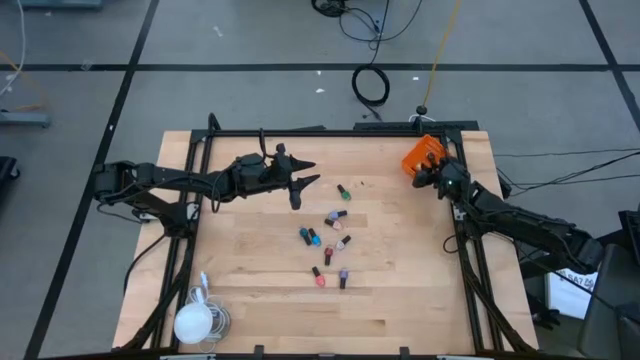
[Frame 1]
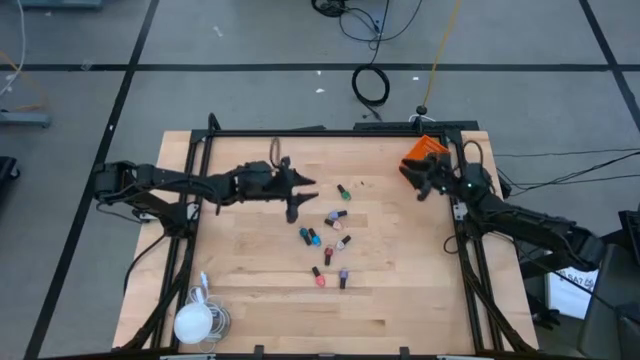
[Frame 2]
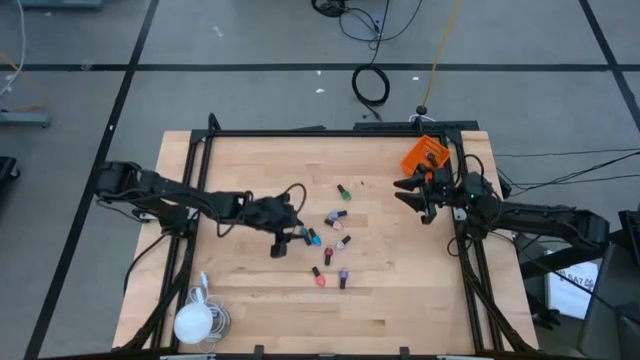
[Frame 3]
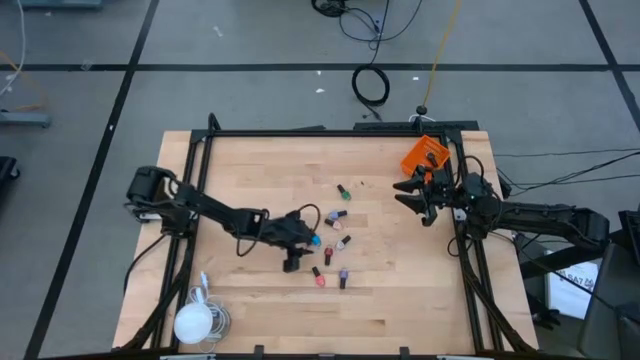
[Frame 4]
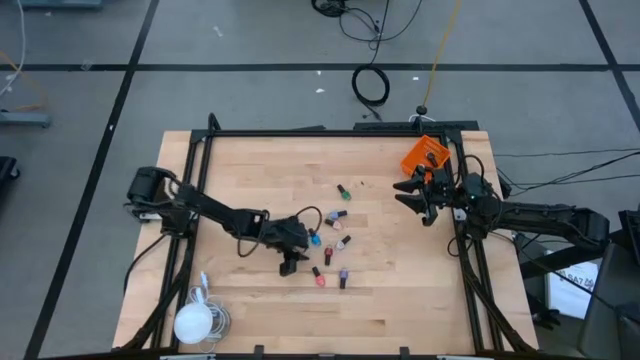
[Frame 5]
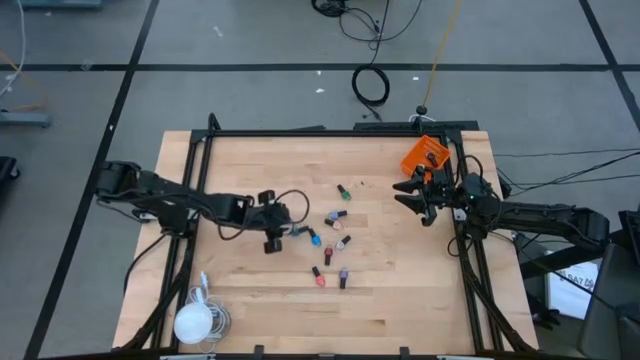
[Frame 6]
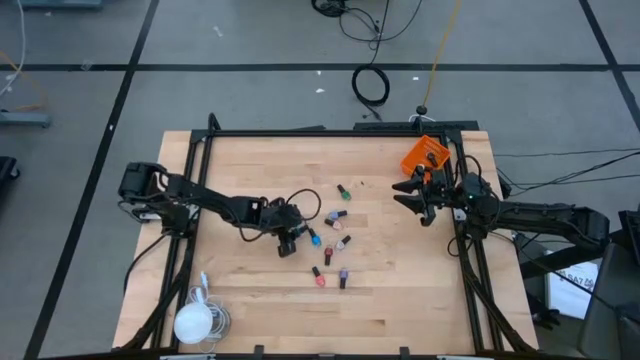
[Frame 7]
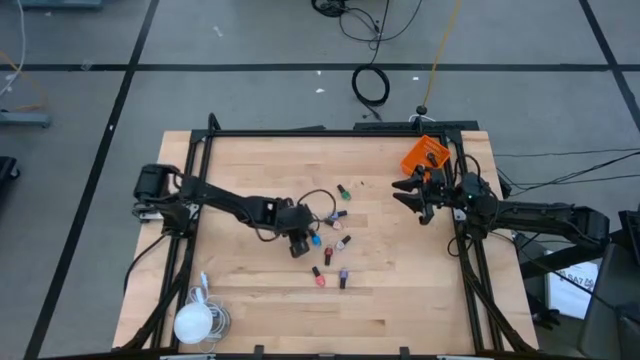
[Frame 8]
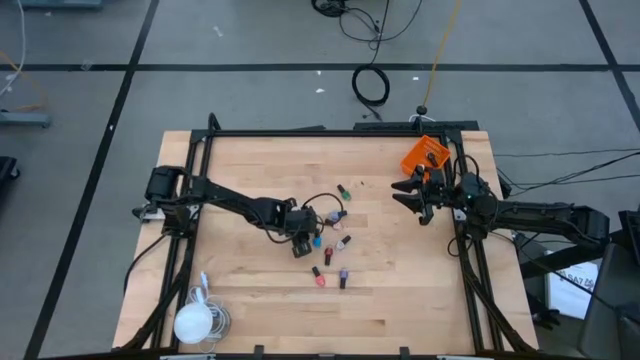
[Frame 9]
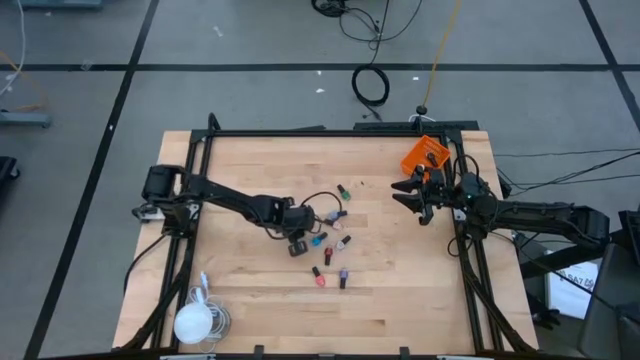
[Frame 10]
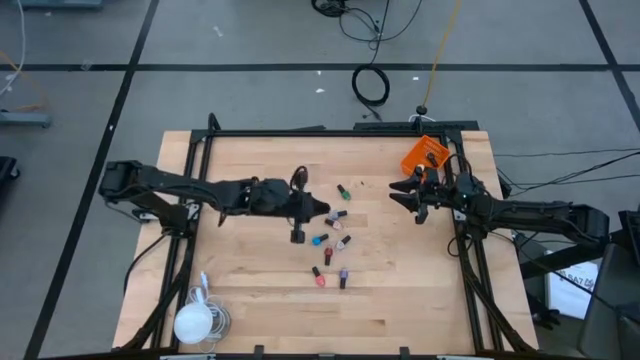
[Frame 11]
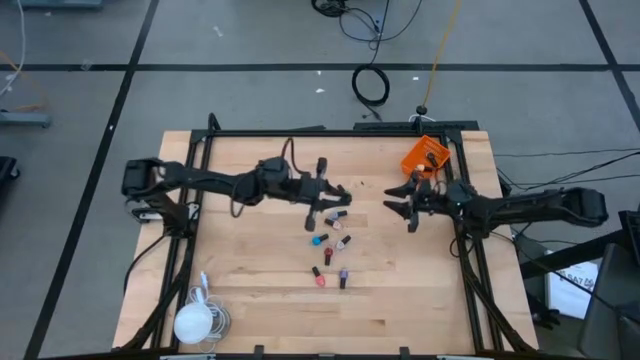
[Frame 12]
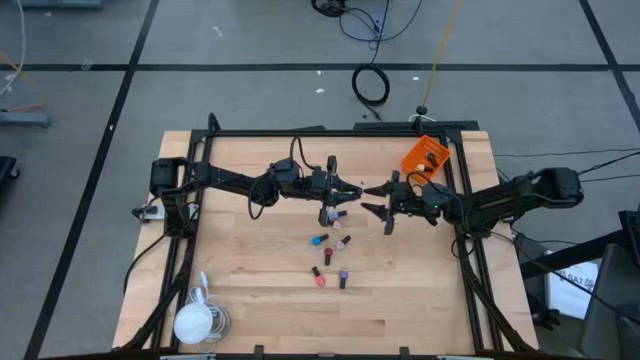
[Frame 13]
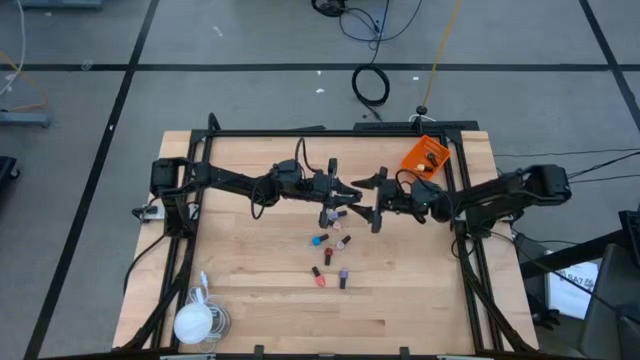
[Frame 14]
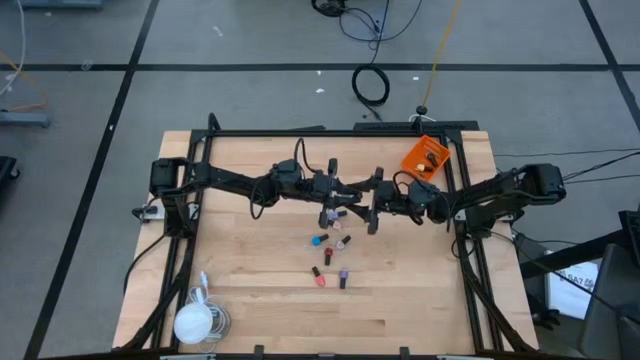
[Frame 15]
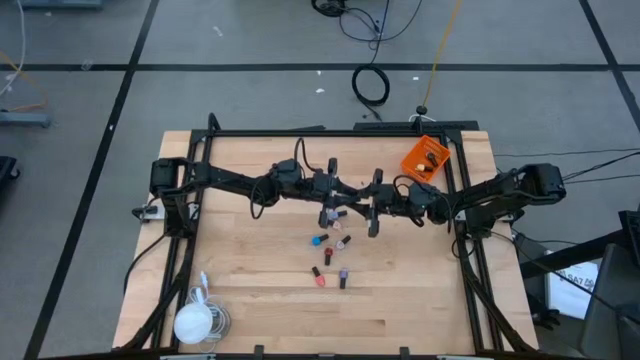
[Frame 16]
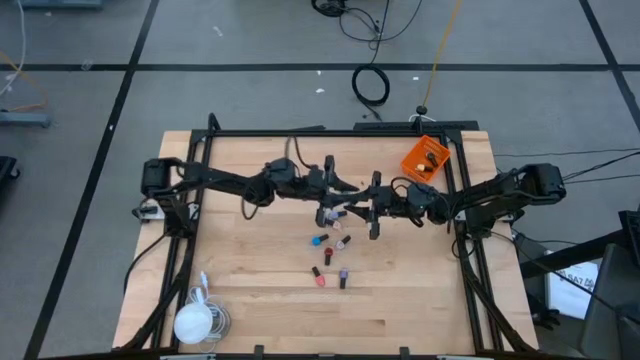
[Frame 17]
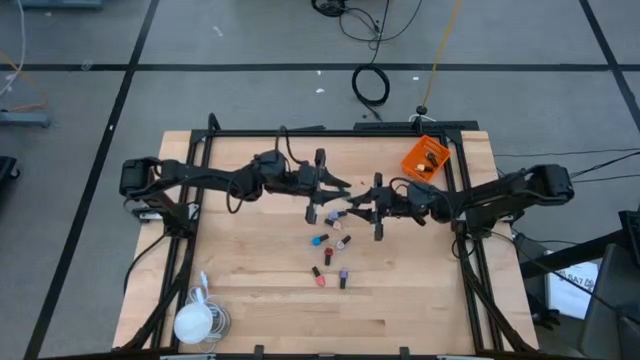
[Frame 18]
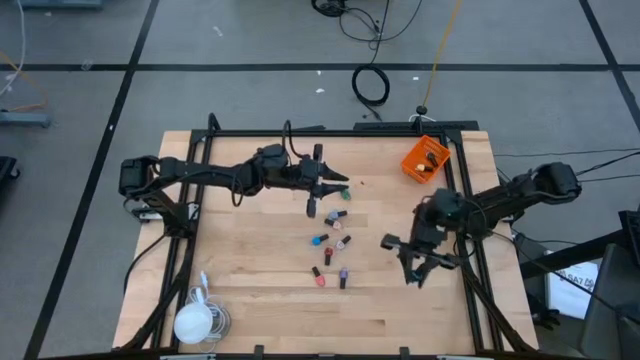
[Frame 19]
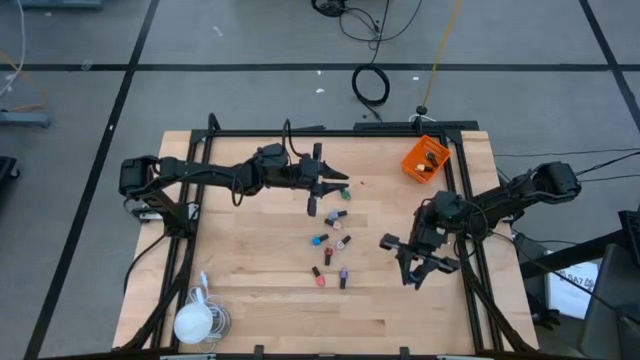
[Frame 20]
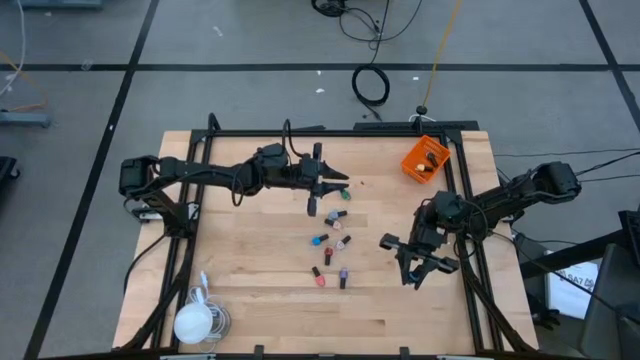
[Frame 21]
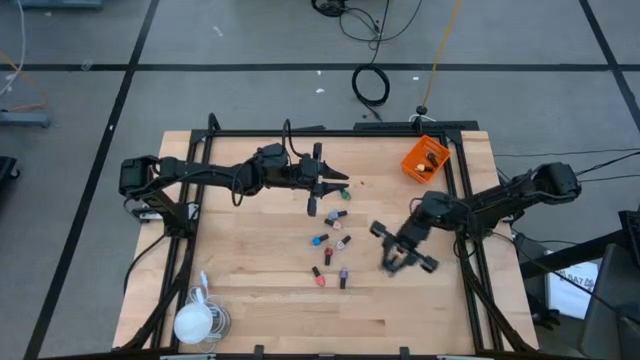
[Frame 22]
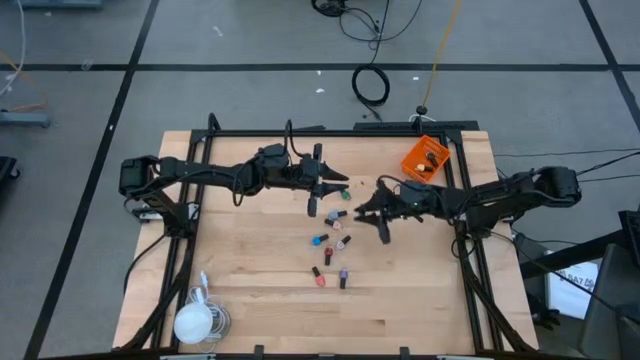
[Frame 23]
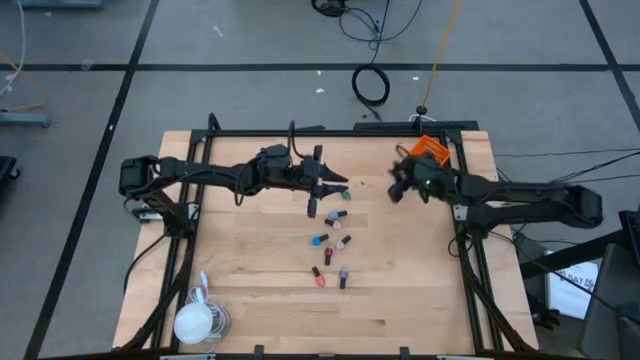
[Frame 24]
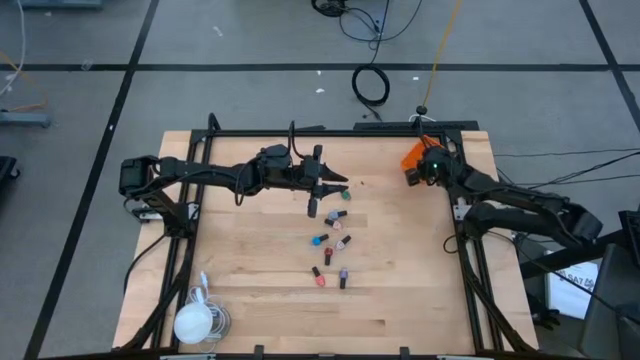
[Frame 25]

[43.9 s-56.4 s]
Task: Pick & Place Nail Polish
Put the violet nail polish bottle into the orange basket

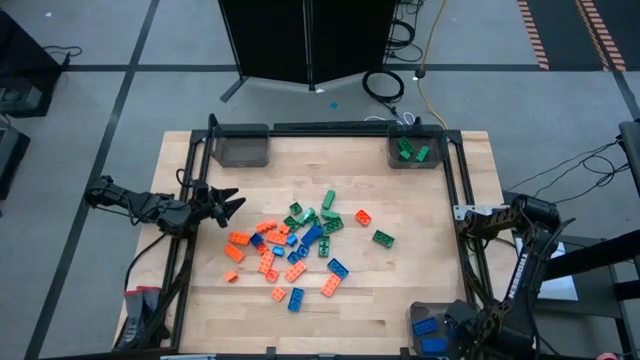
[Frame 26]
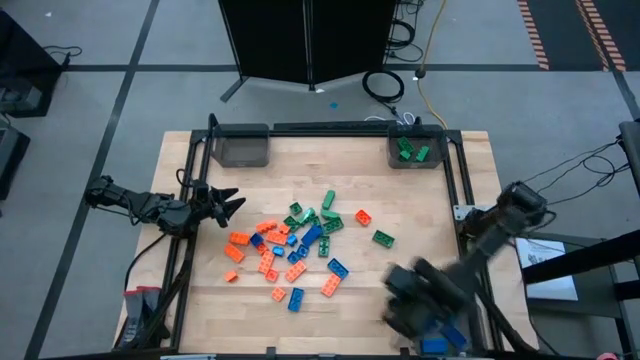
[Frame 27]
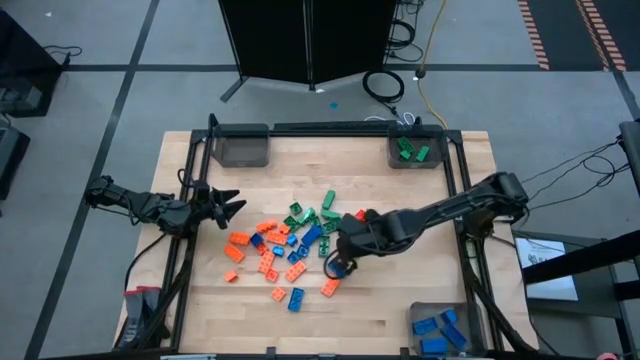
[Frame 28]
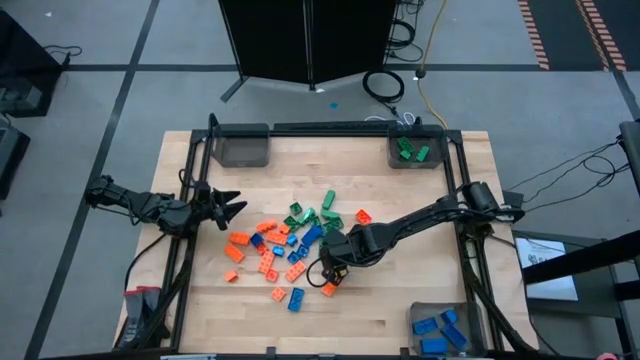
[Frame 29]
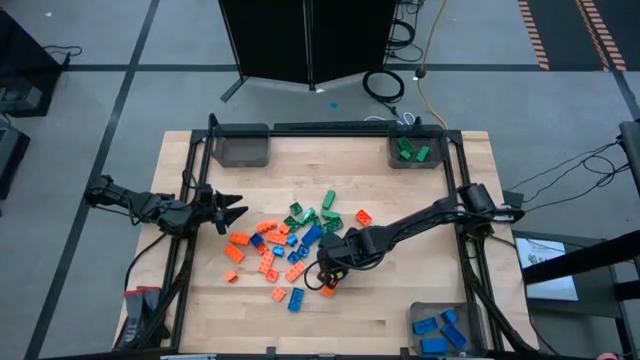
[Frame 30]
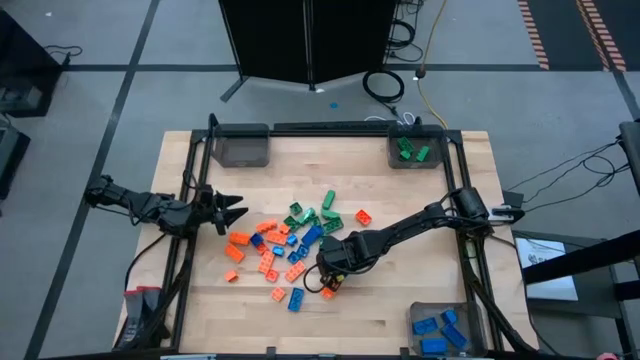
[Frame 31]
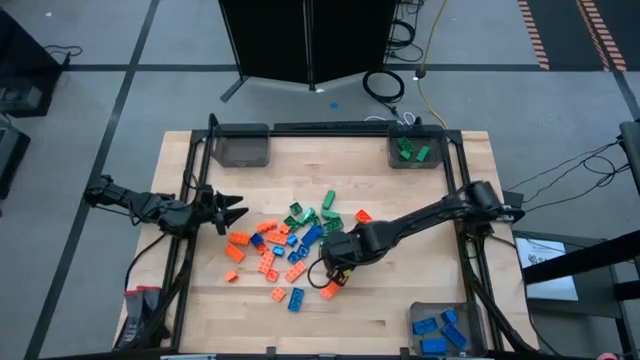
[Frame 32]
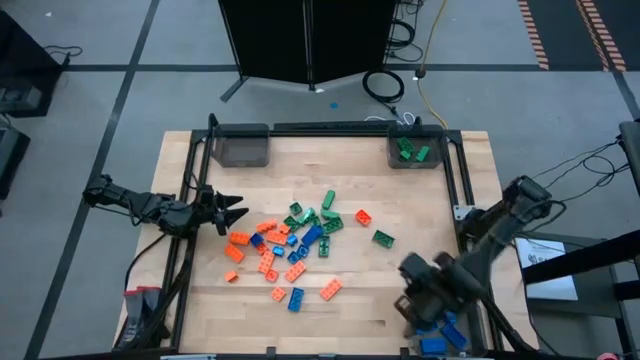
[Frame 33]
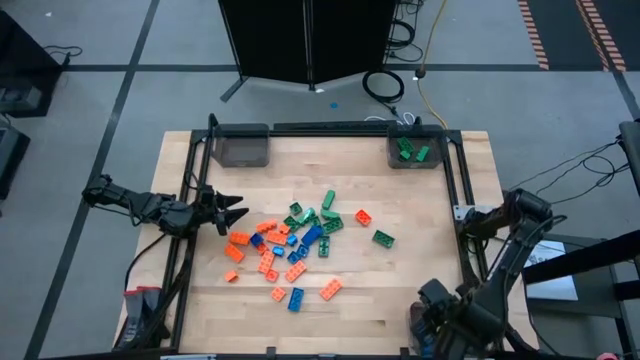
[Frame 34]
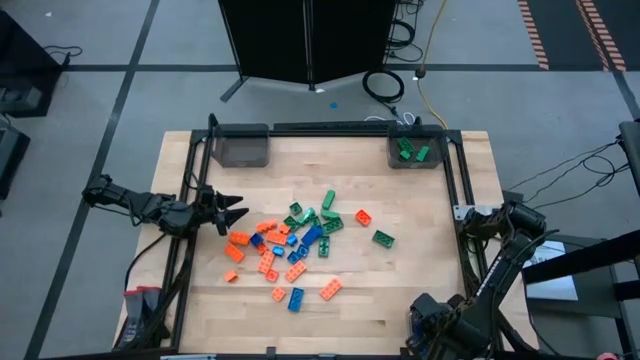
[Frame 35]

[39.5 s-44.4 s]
Task: Sort blocks
Put the blue game piece into the bottom black bin

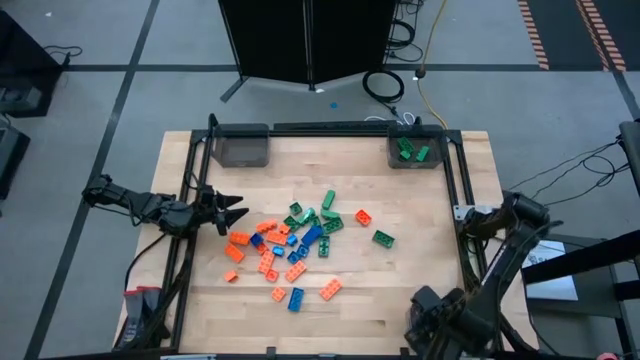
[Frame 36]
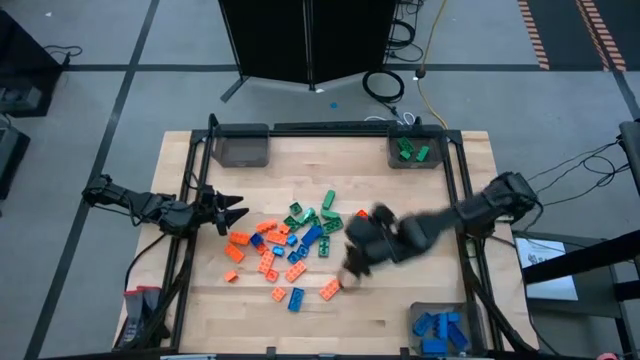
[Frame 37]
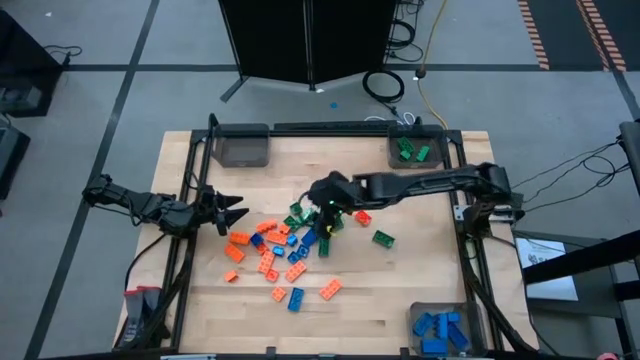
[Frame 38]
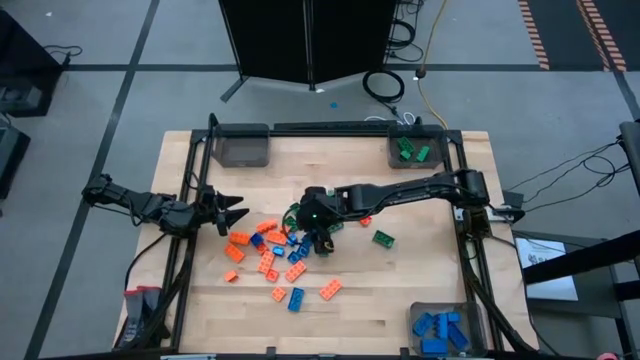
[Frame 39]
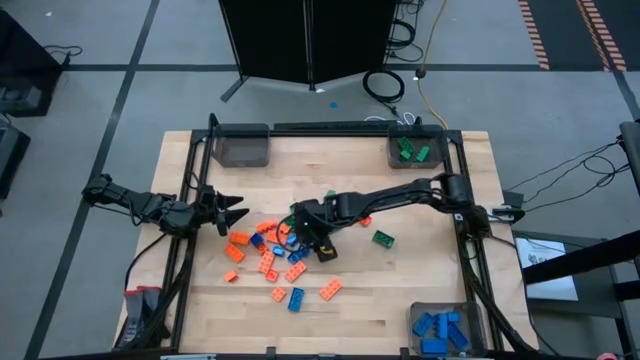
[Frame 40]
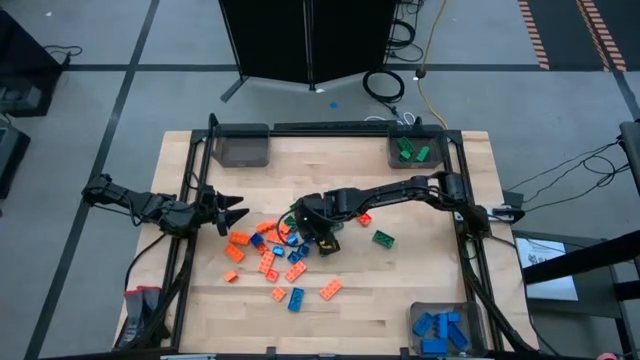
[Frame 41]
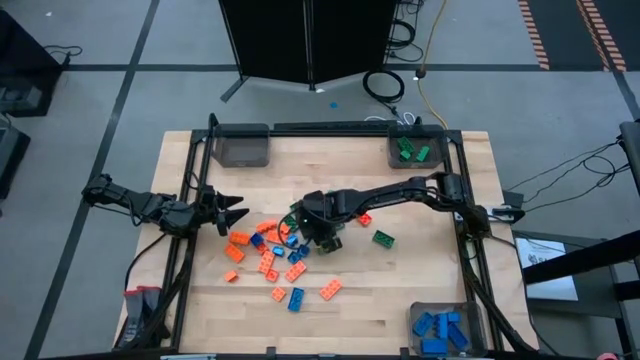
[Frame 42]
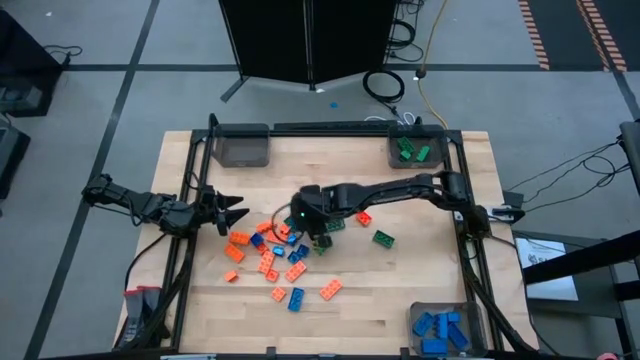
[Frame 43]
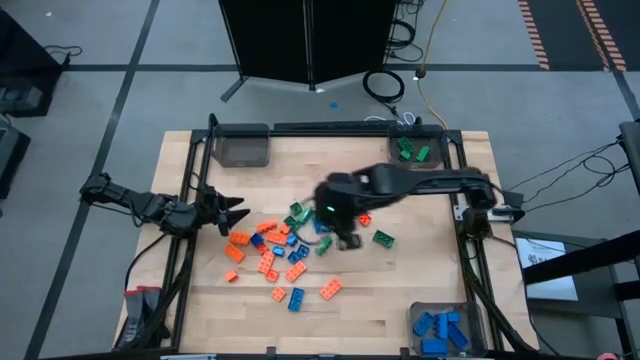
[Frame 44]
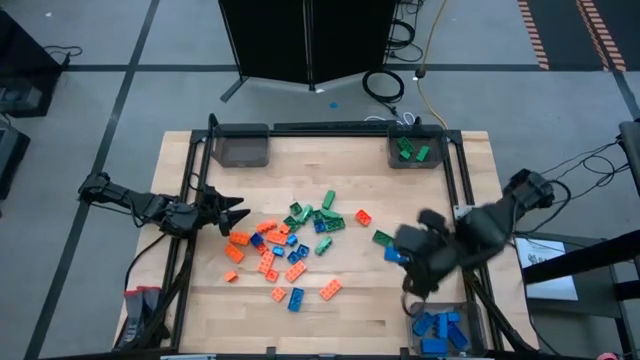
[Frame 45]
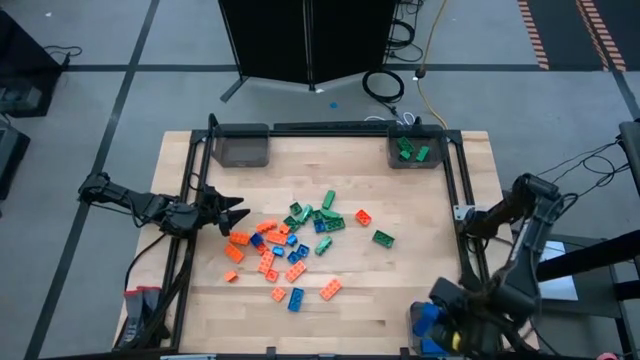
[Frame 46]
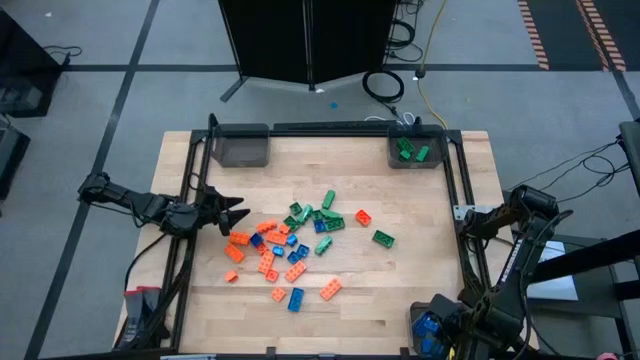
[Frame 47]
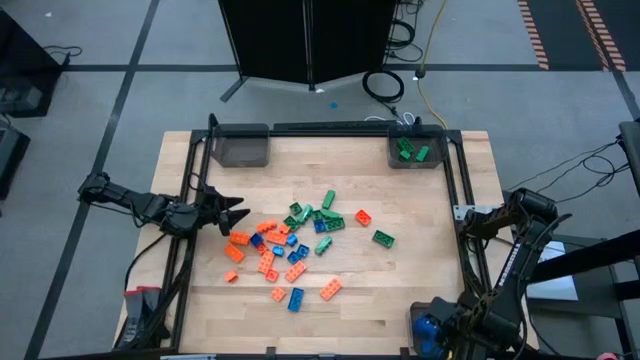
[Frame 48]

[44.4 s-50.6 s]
Put the blue game piece into the bottom black bin
